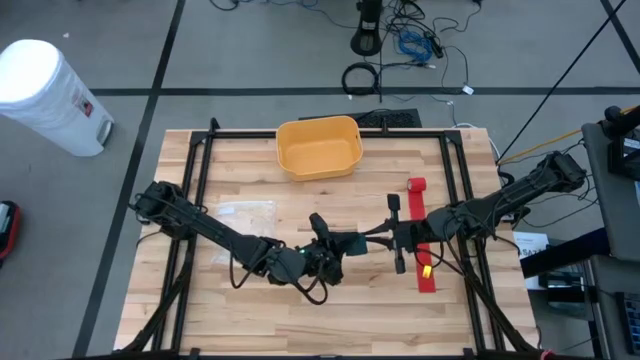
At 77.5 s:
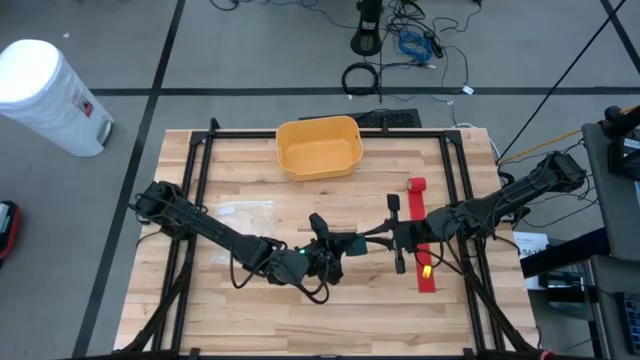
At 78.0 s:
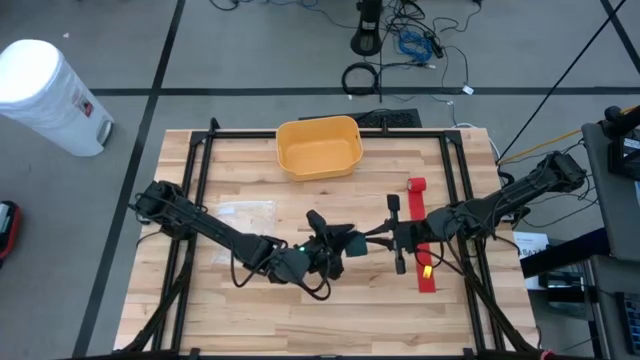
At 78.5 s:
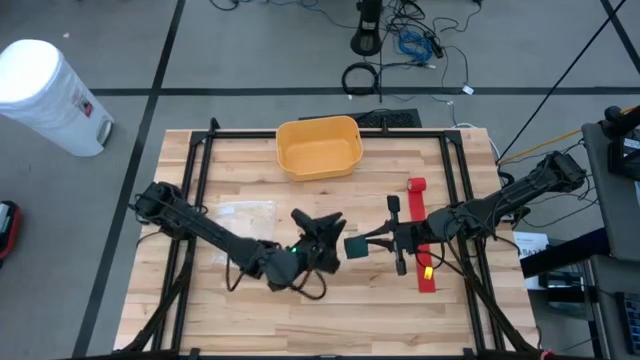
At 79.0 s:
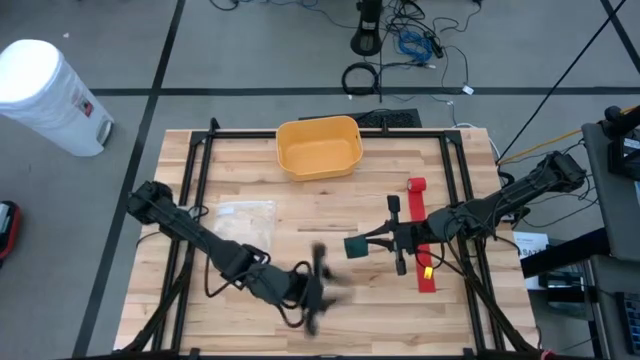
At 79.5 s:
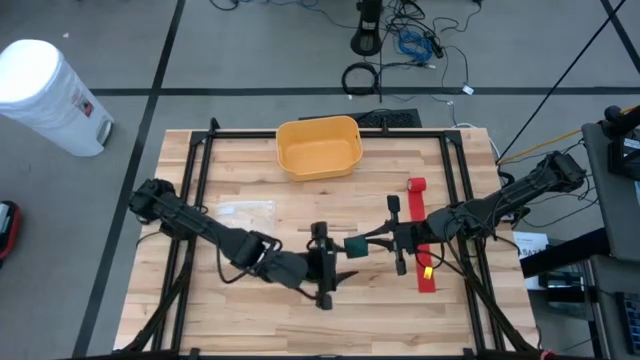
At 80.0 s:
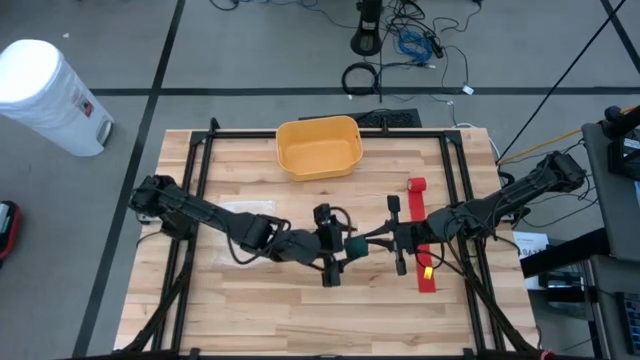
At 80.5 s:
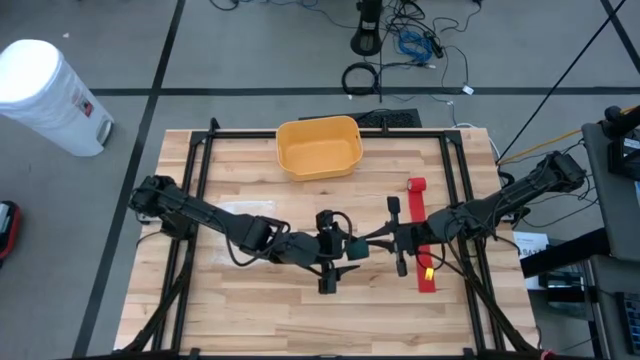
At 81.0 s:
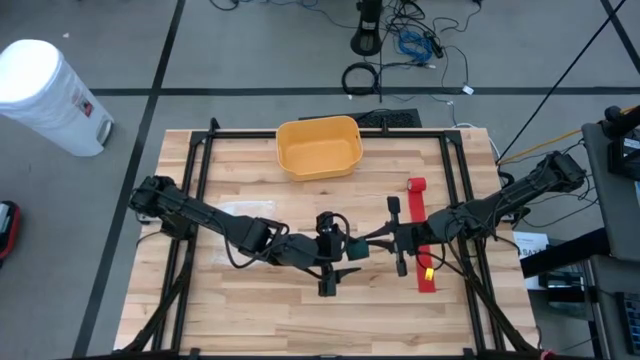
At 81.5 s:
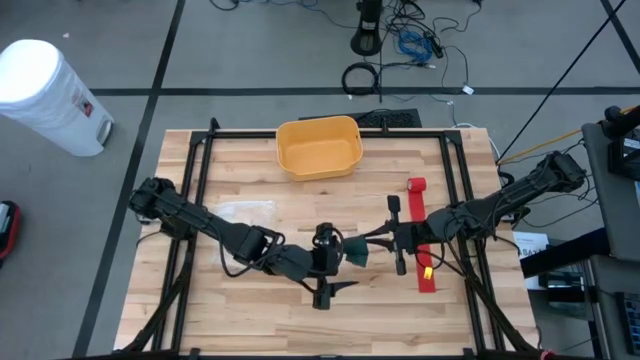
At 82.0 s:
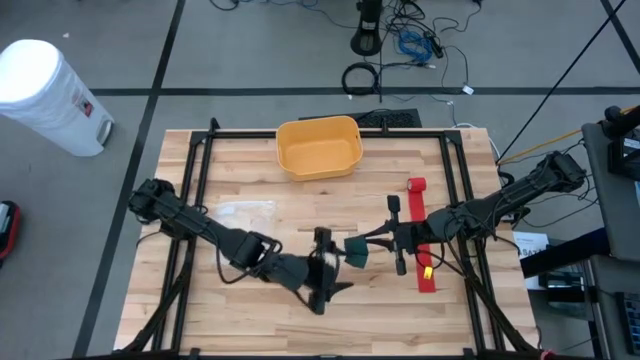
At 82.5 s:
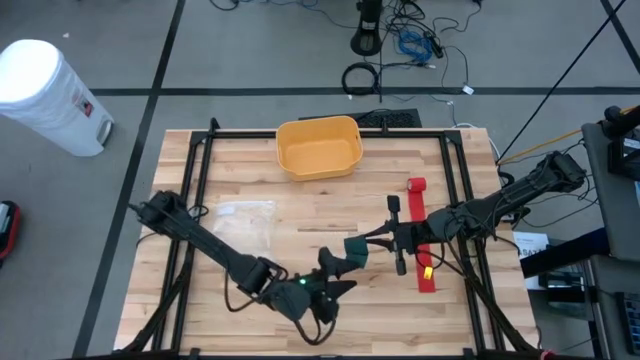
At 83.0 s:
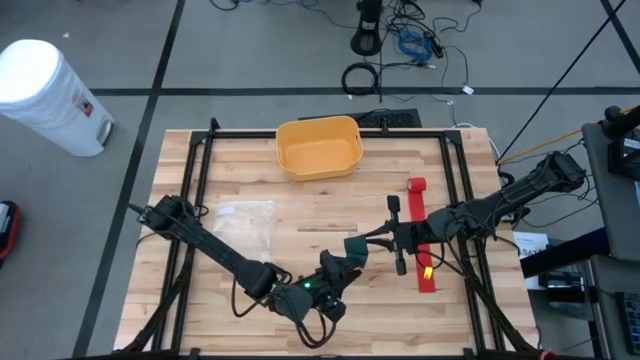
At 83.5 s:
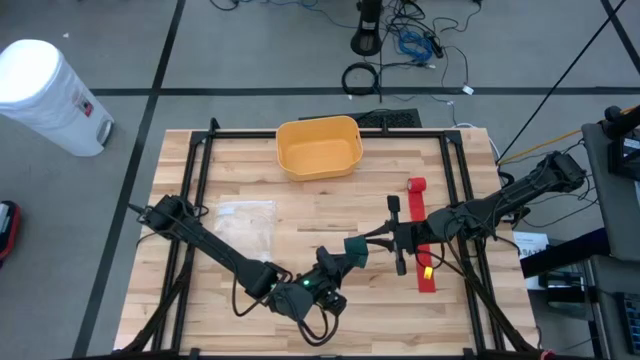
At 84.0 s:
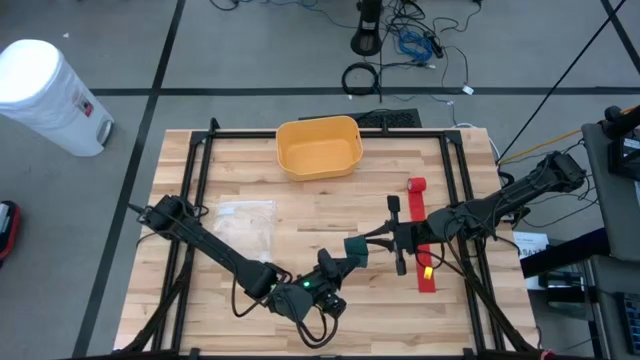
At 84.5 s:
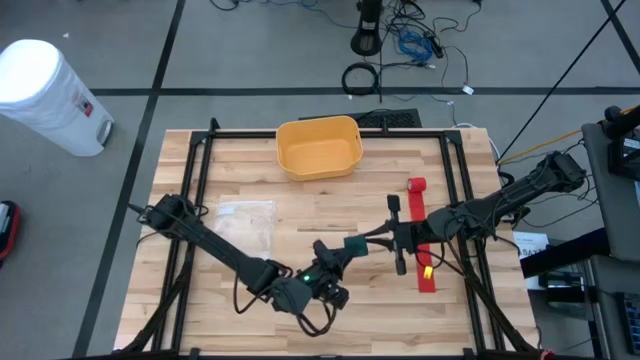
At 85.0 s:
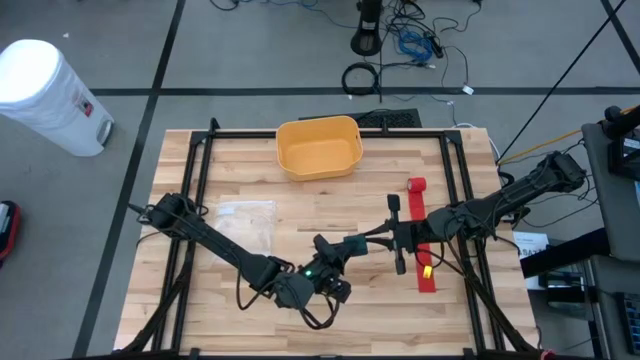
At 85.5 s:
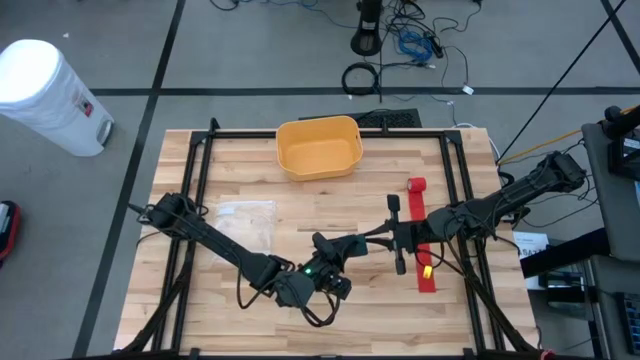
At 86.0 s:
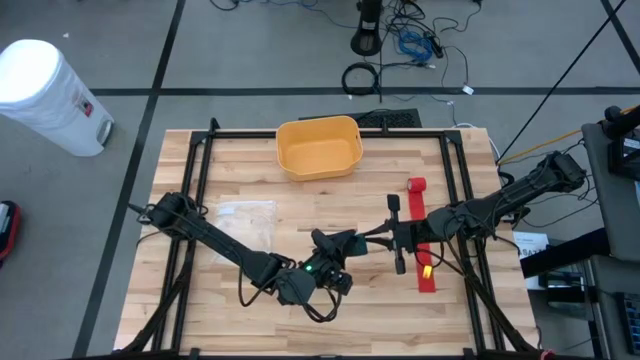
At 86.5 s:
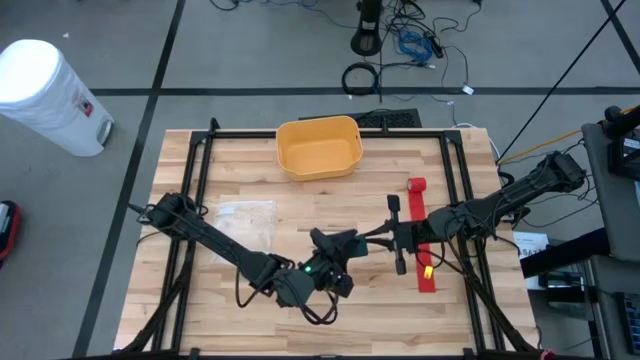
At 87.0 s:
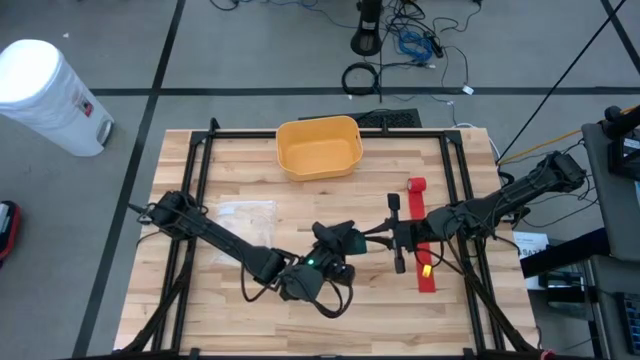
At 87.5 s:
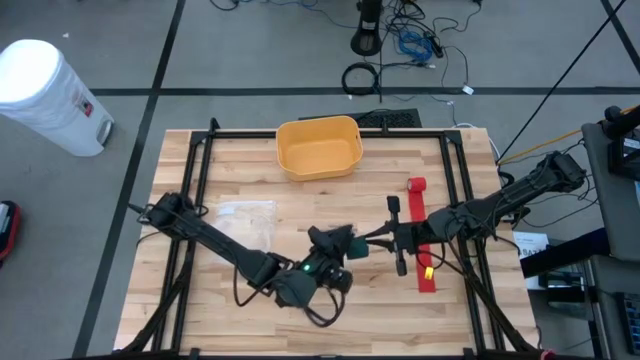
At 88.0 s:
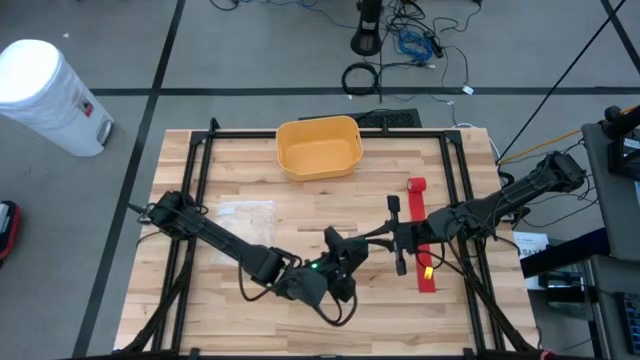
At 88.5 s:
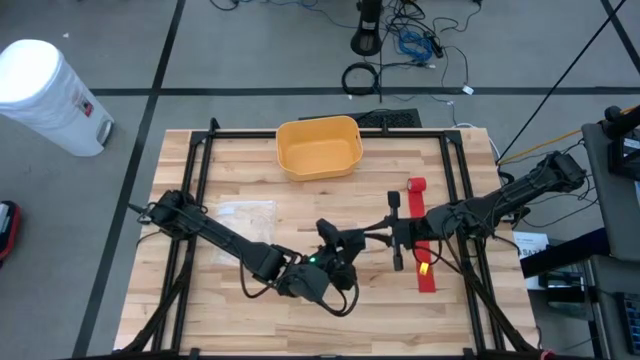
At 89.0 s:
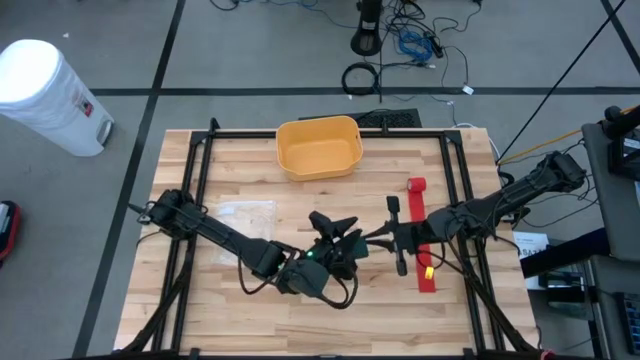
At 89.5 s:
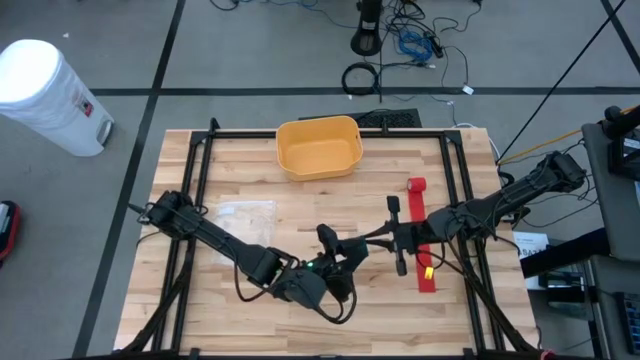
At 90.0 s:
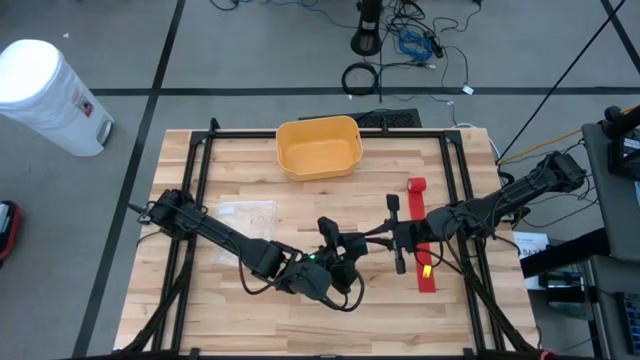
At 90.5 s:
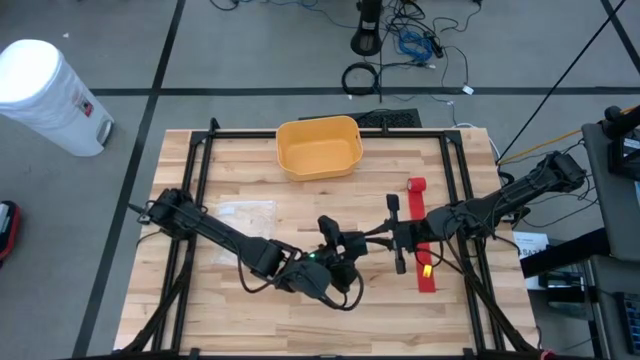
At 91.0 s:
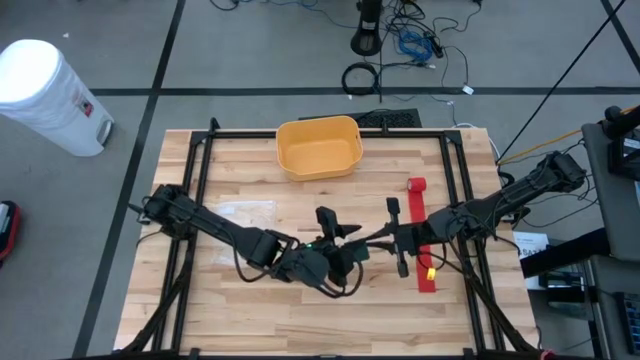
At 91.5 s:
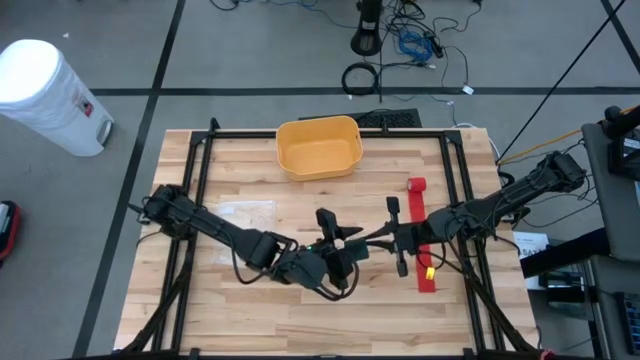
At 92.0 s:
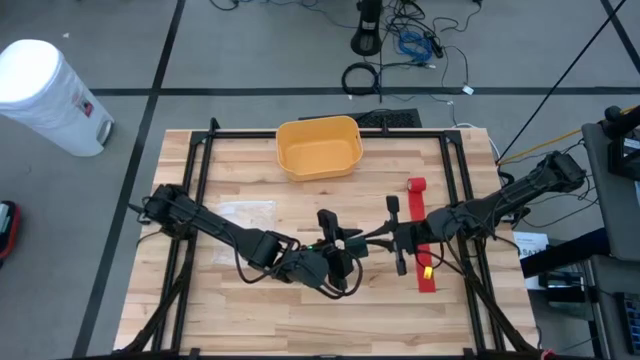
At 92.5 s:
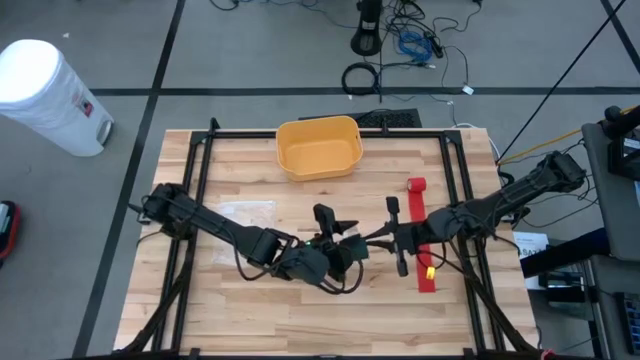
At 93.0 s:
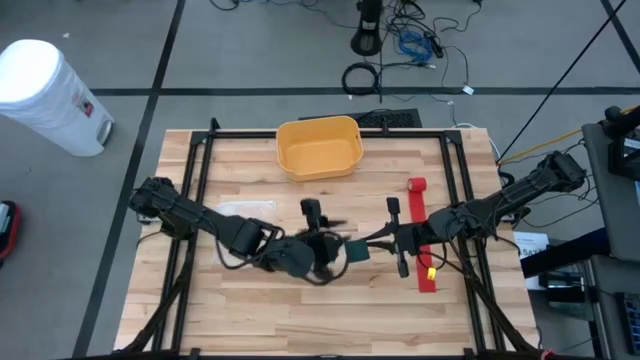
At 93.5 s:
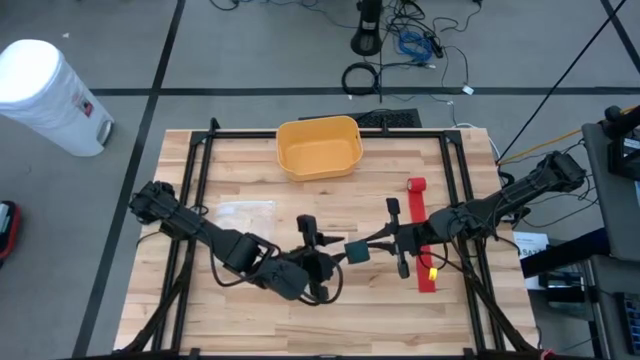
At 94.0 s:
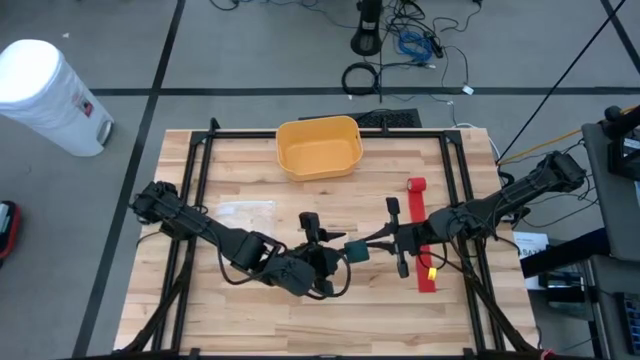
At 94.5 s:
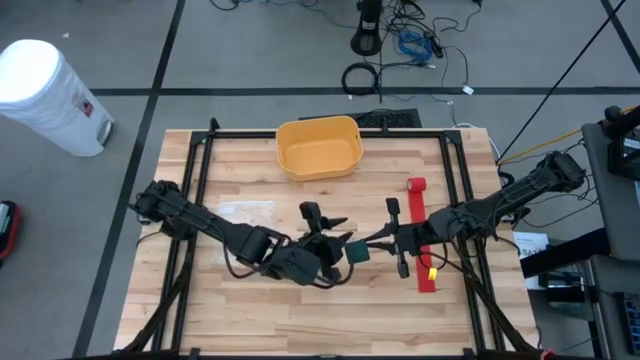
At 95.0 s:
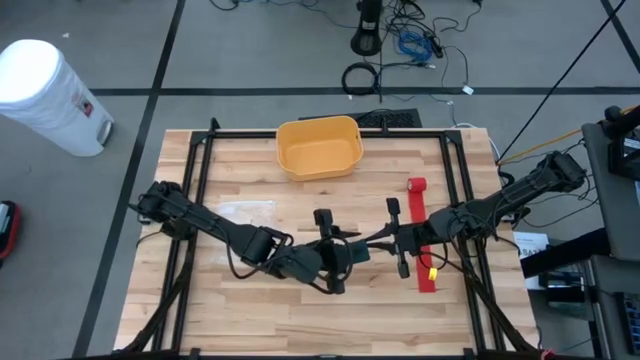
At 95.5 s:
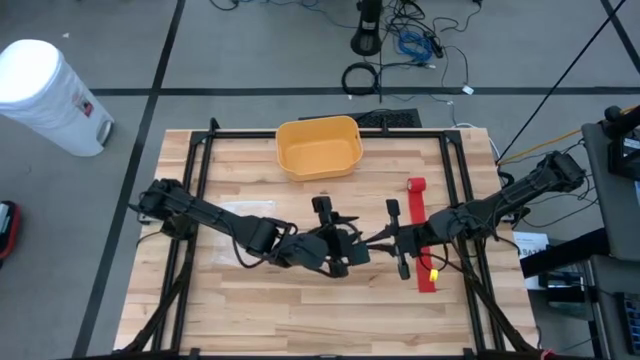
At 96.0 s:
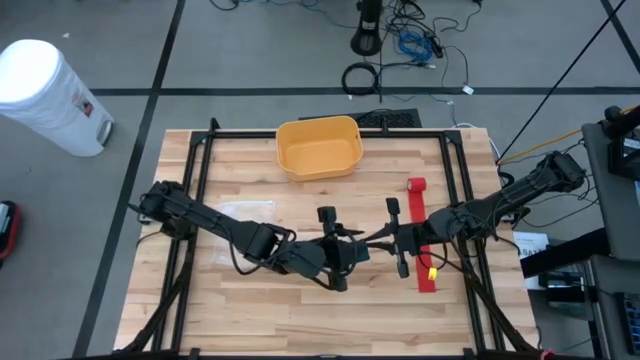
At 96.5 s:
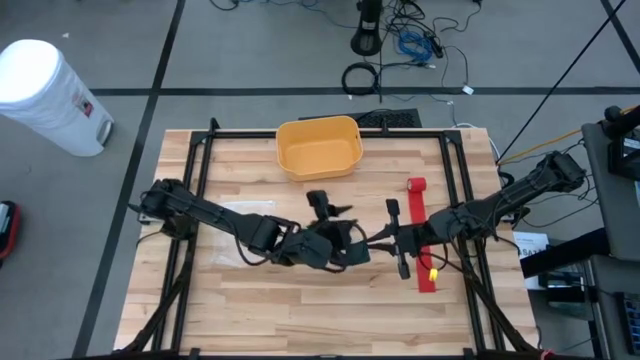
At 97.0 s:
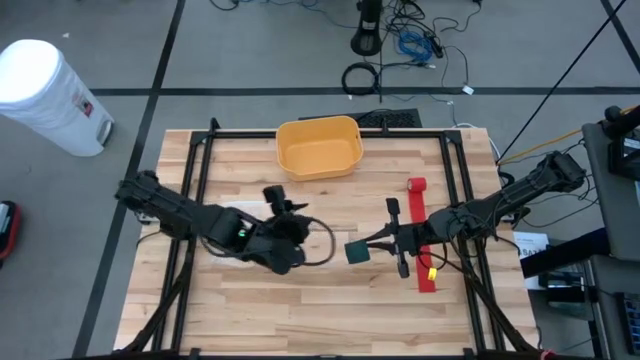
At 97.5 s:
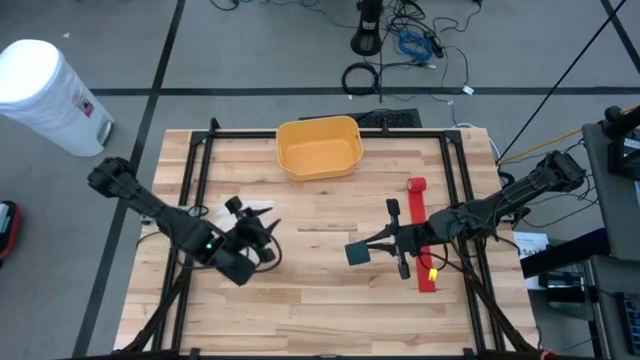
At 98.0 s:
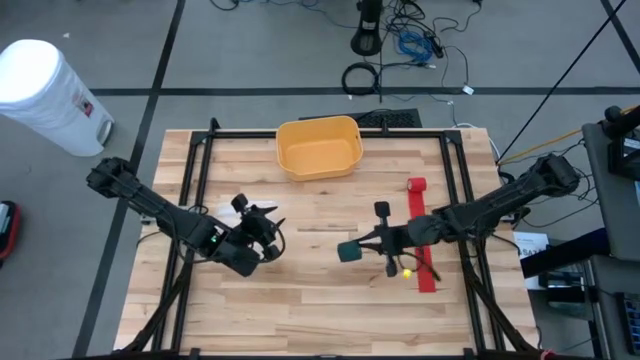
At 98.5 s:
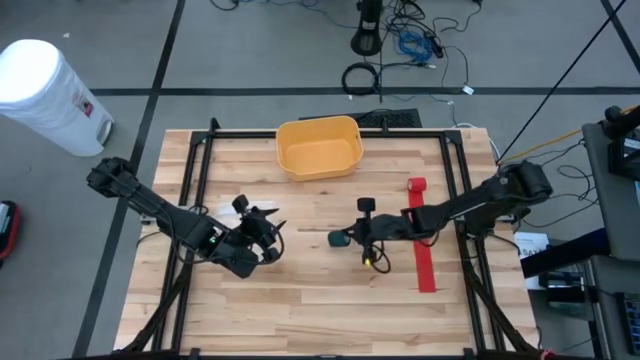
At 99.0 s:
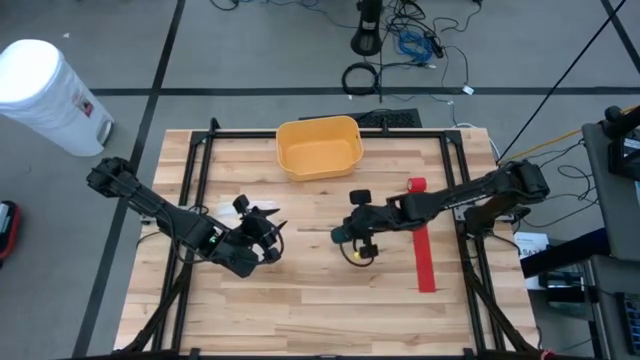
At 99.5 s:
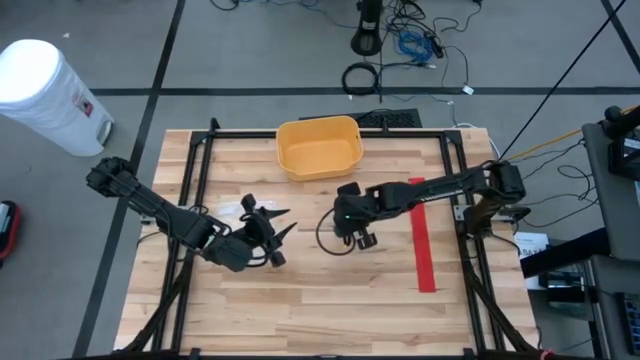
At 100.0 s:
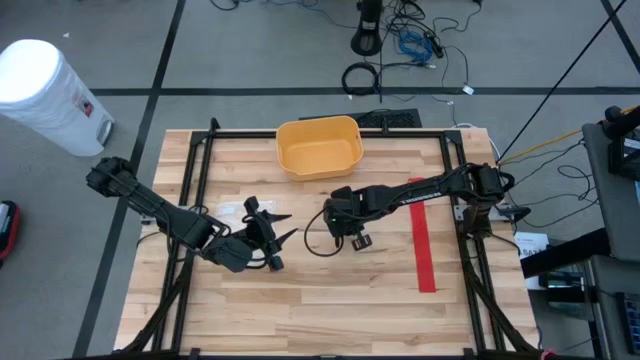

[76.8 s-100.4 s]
Task: Roll bandage
Roll the green bandage
